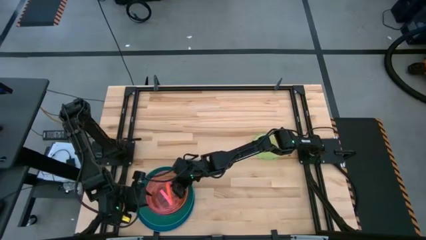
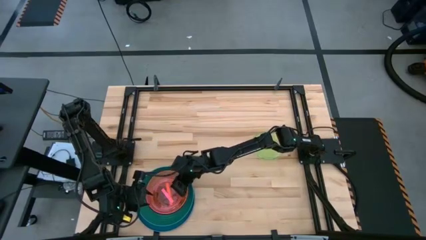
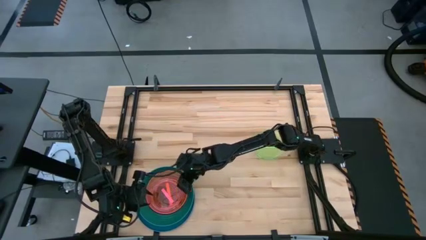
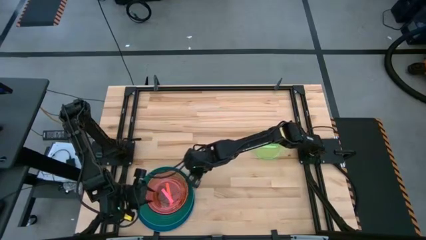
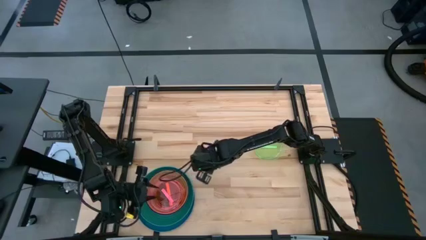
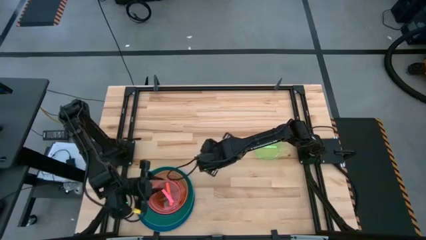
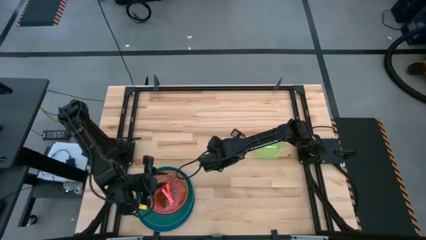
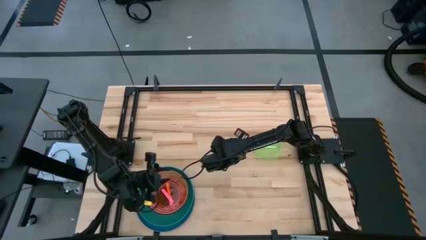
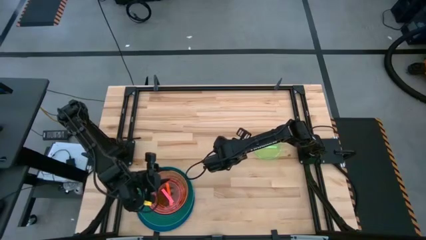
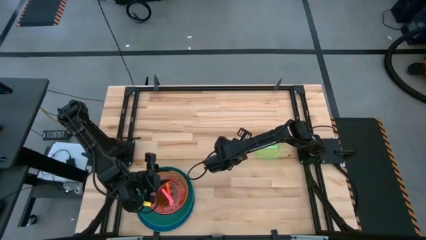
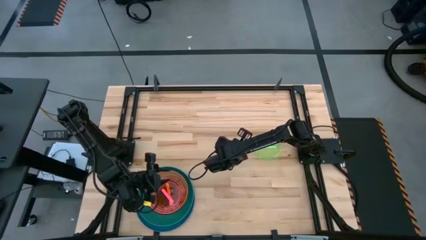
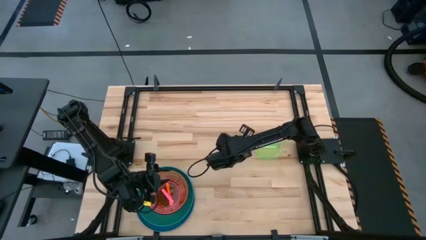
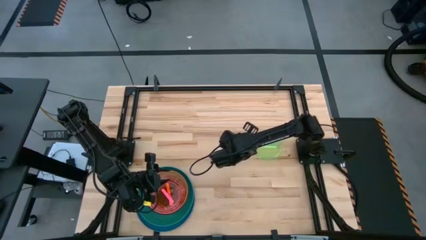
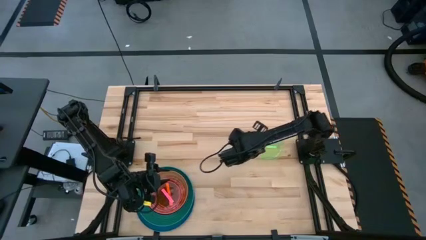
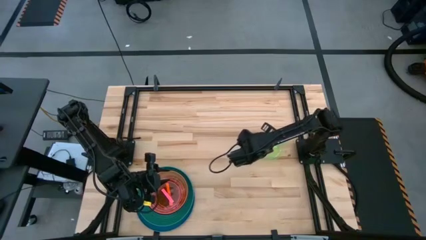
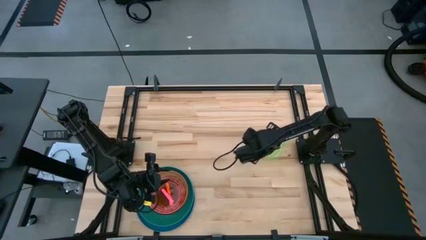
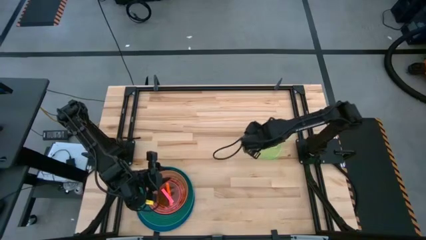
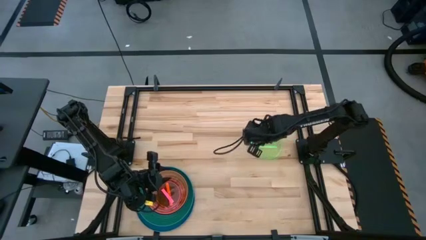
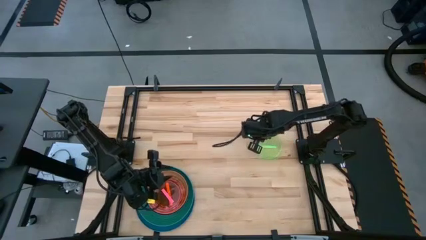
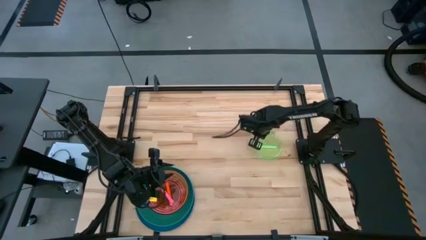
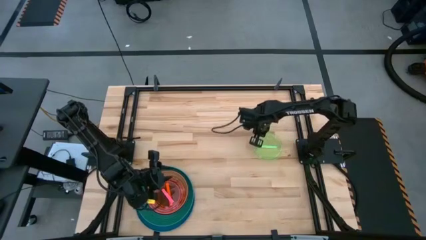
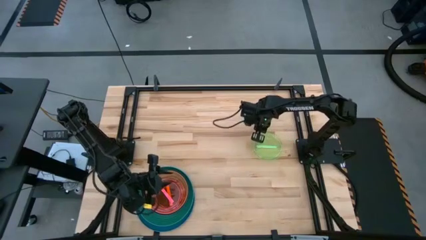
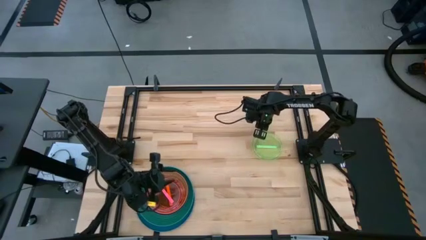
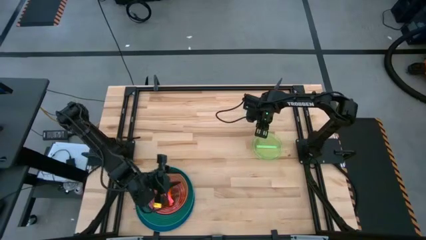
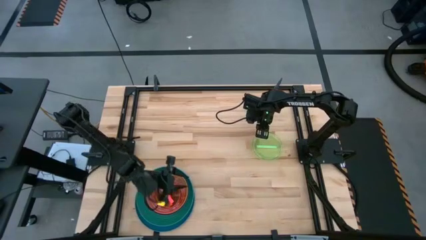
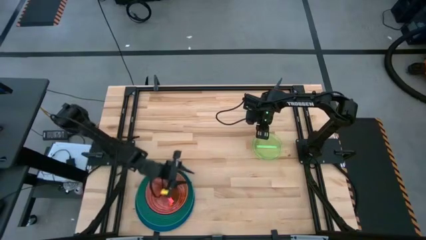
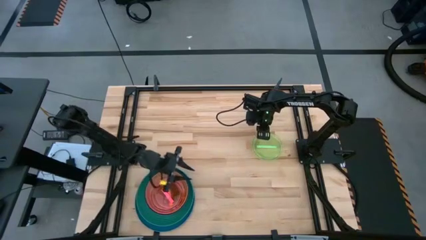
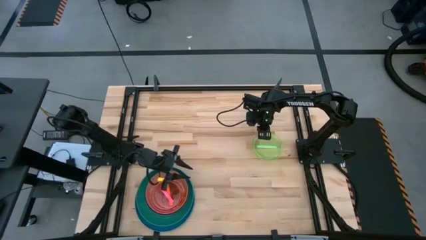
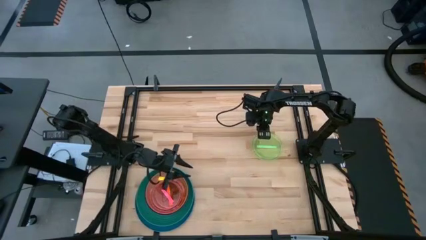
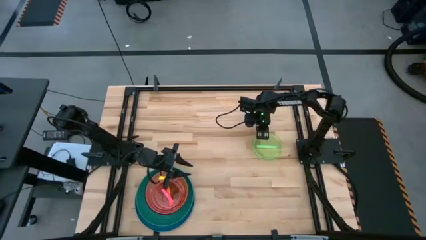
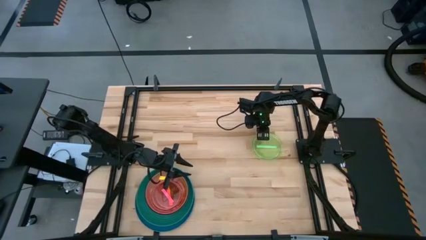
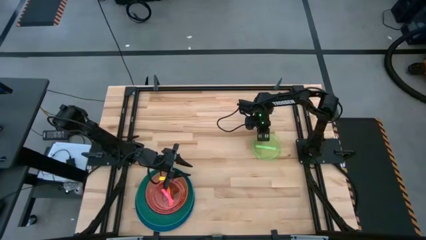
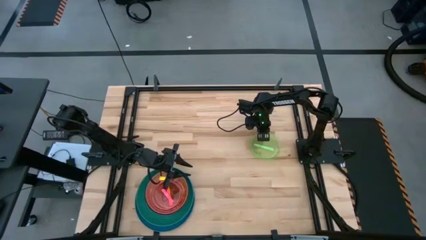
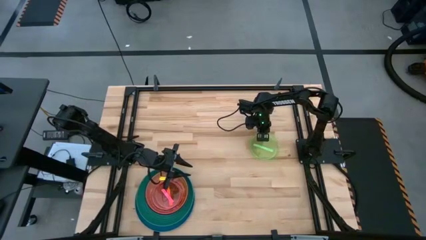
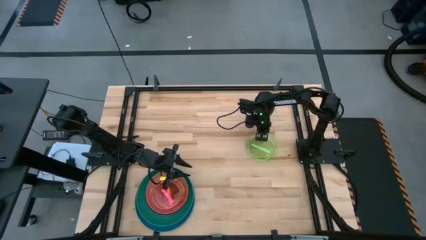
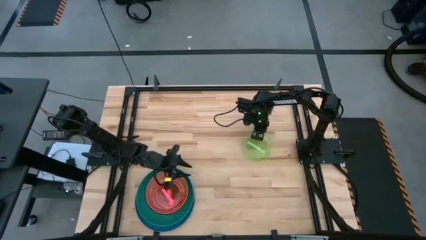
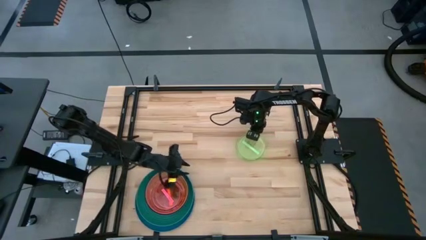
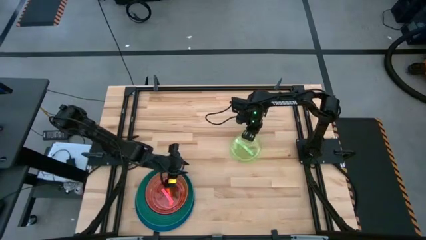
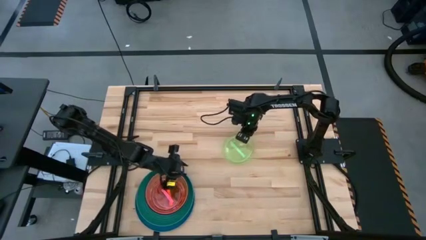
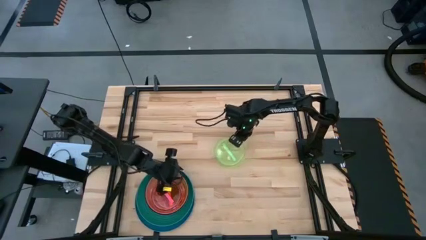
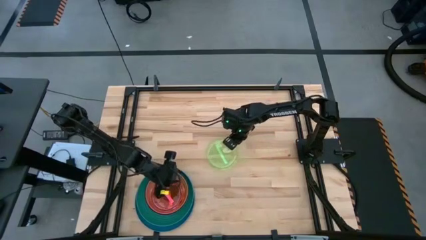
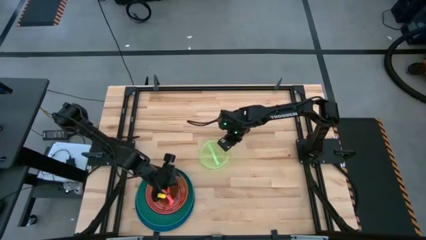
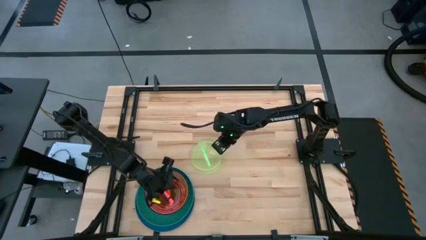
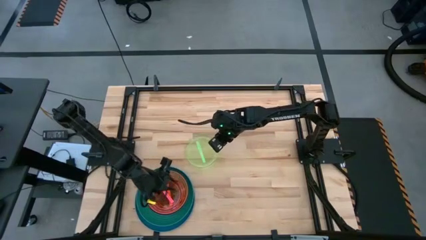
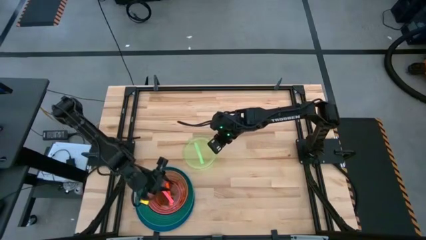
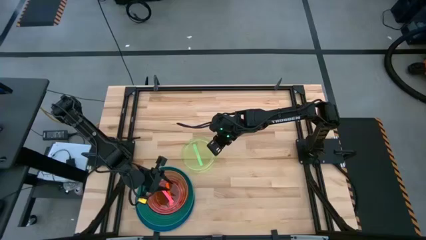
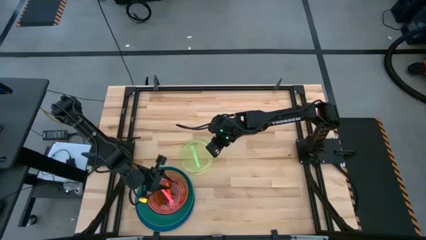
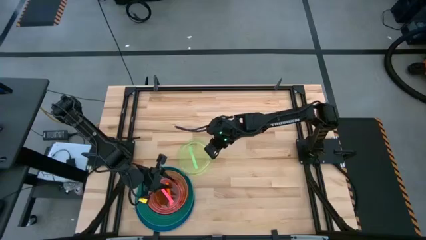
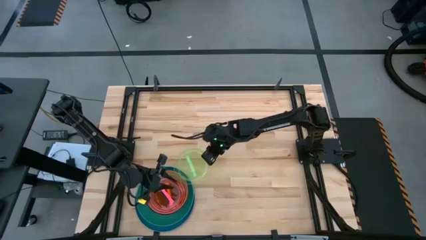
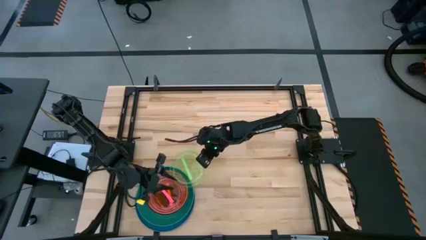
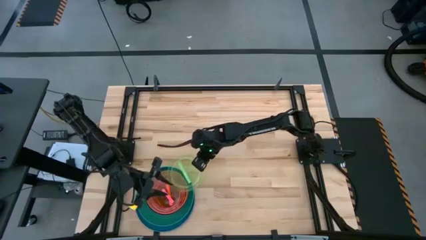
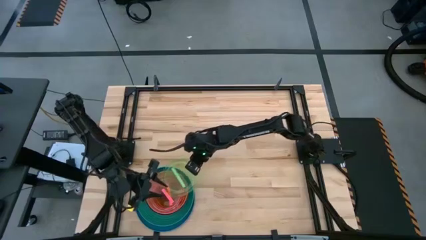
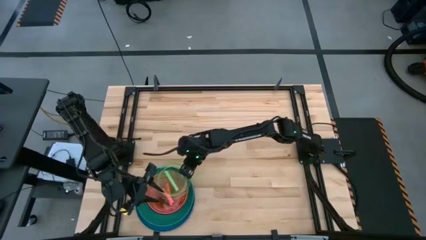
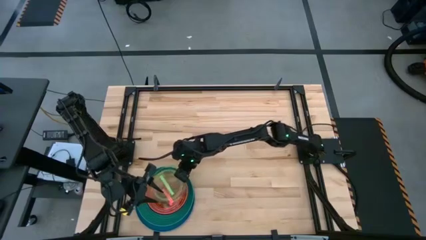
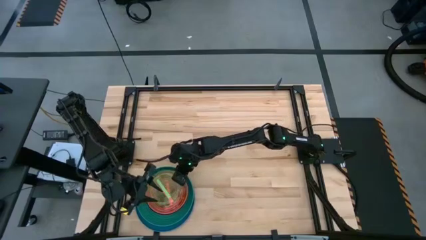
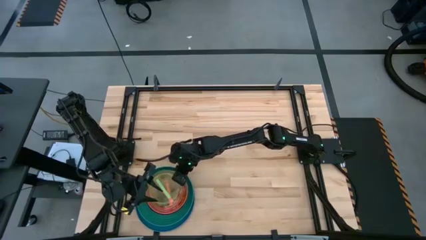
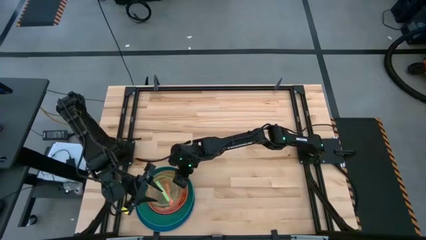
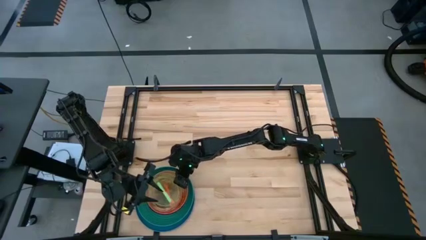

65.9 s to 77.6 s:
Task: Stack plastic plates
Stack the light green plate on top of the light pink plate

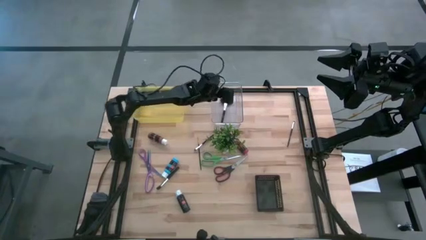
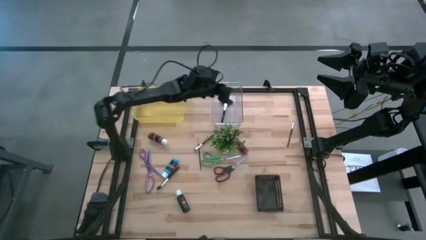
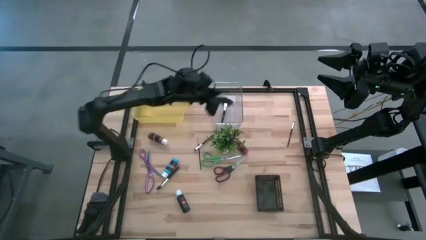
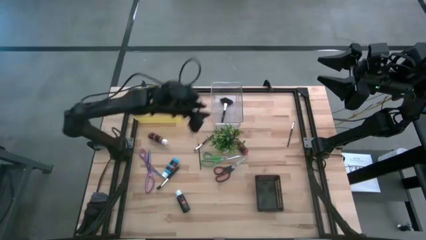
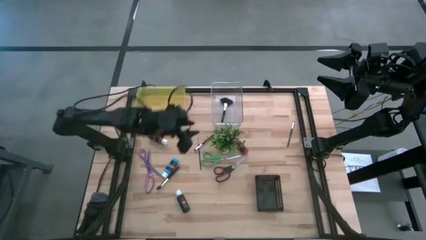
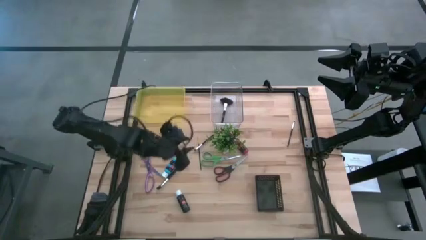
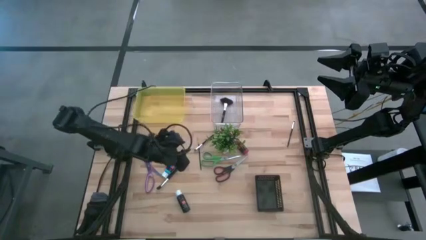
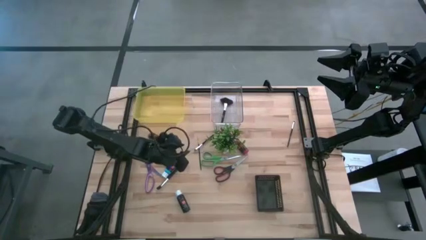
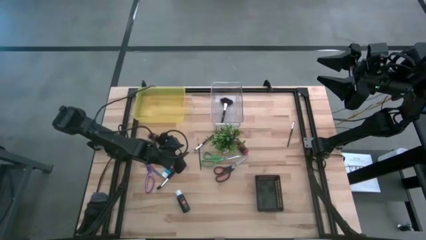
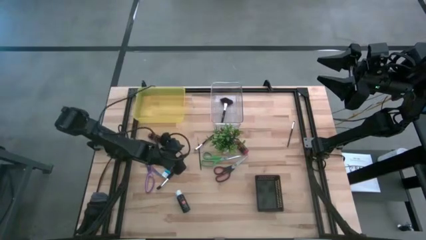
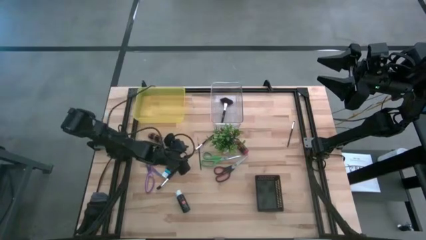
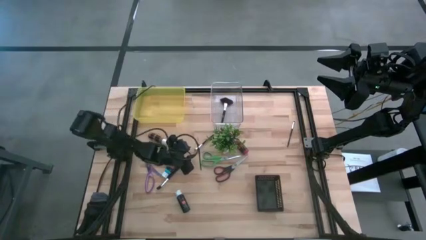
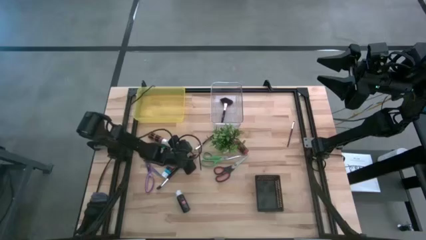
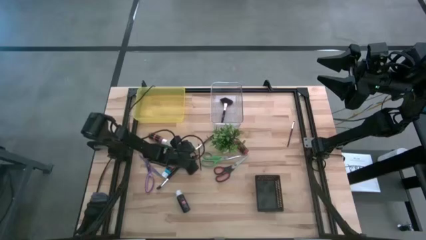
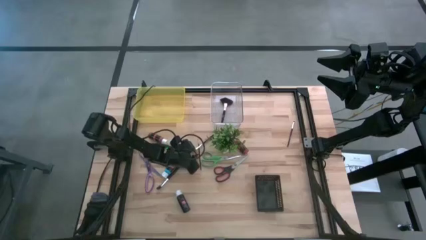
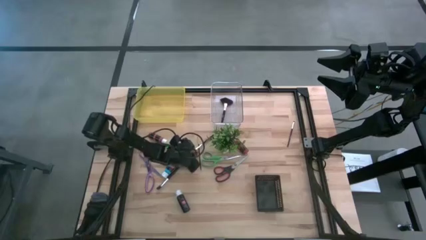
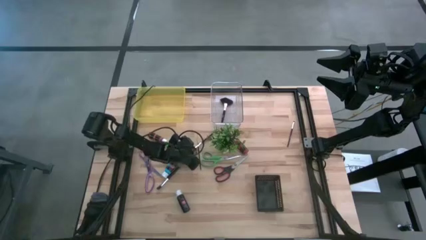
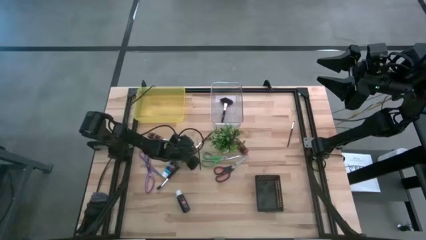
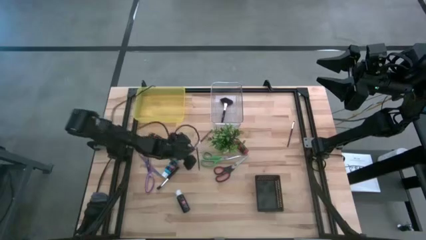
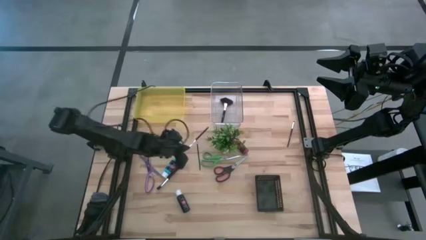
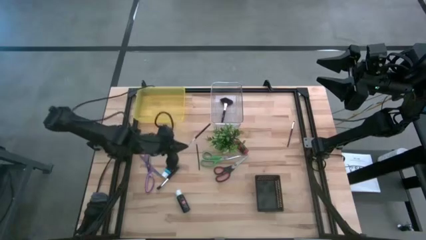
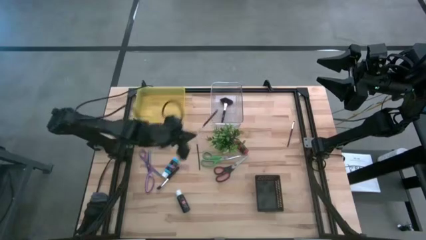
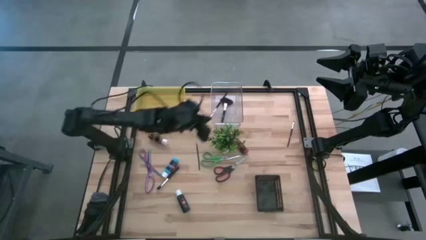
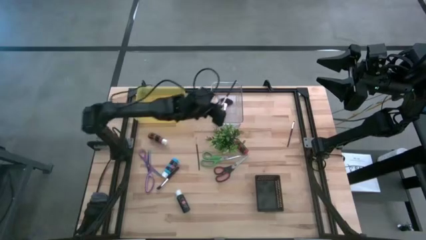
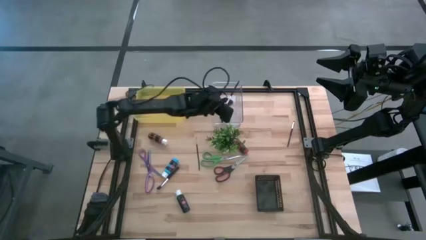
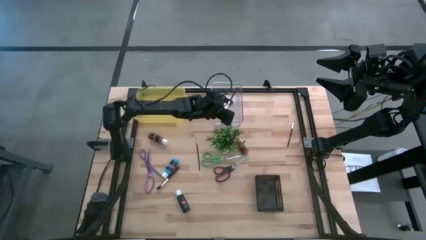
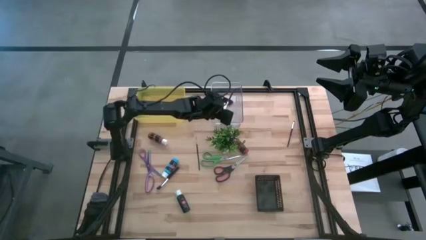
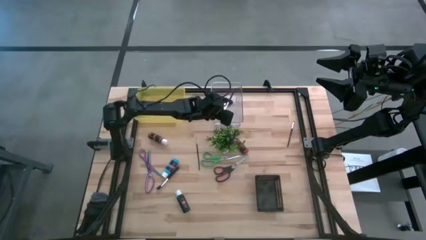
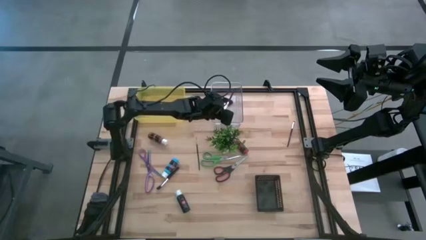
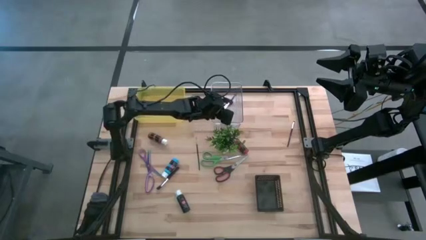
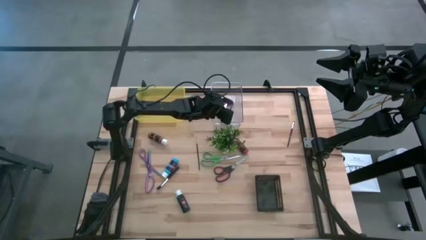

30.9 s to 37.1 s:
Task: Pick & Place Paint Supplies
Put the left eyeshadow brush into the transparent bin

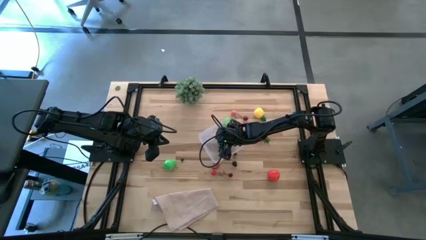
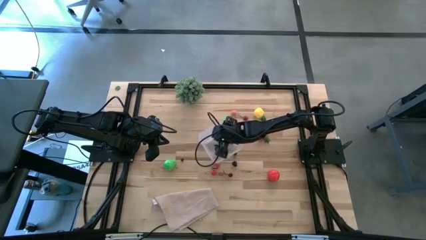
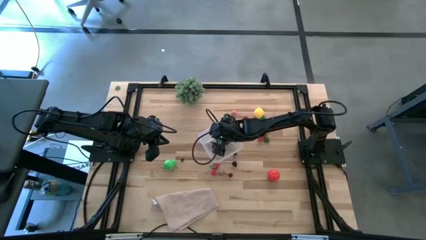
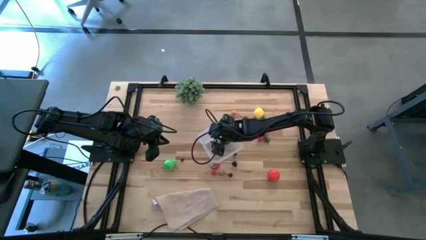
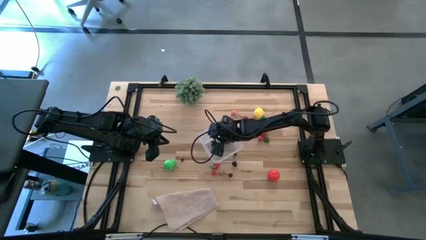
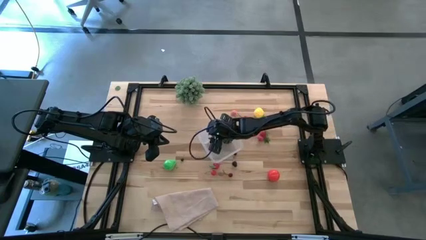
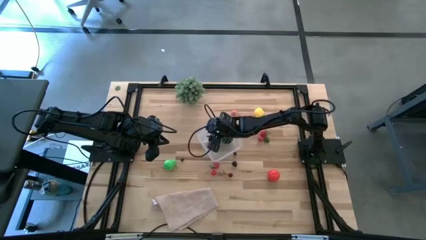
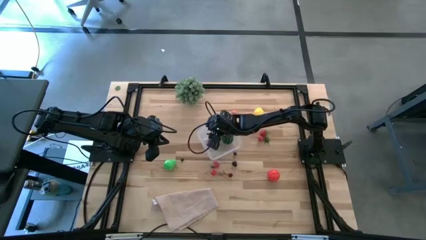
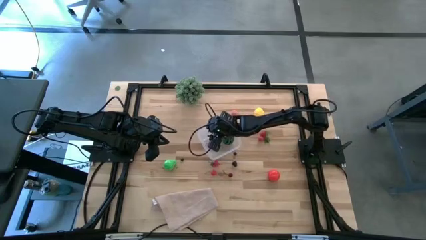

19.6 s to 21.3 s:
Task: Pick and placing Produce into tupperware
Adjust the transparent bin
